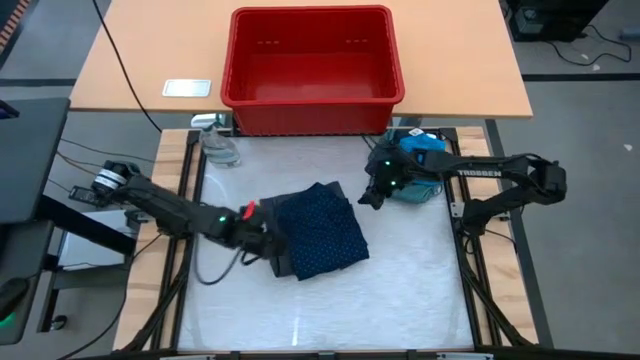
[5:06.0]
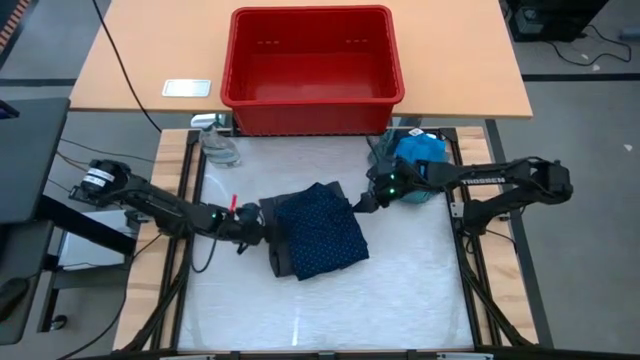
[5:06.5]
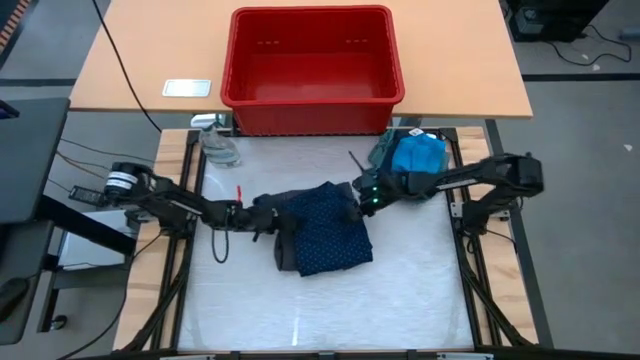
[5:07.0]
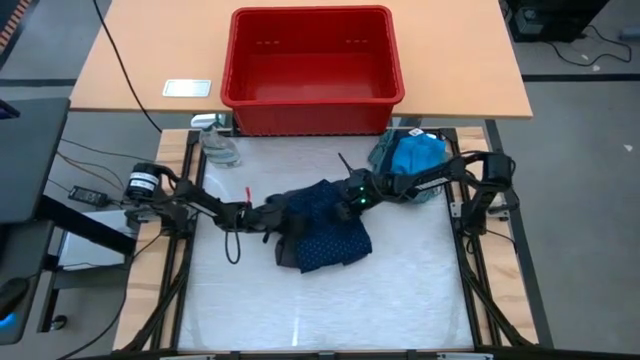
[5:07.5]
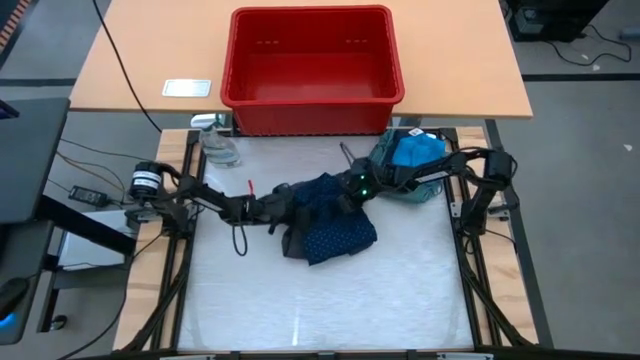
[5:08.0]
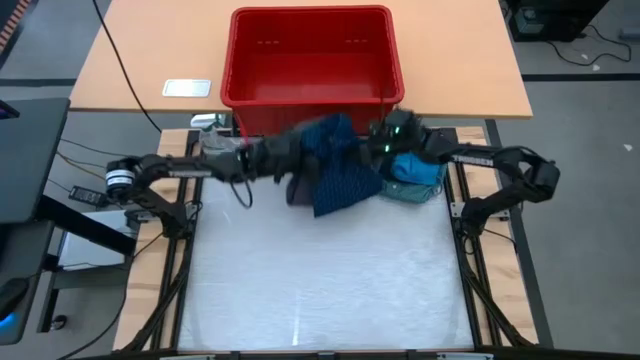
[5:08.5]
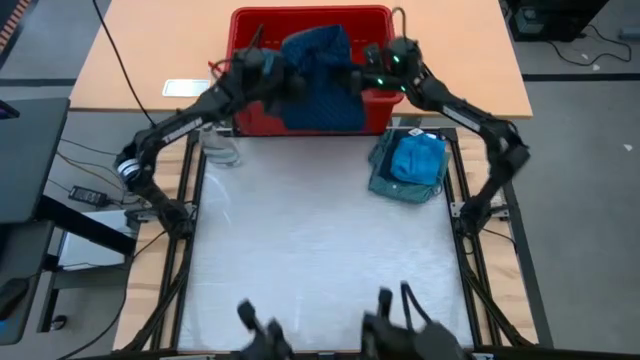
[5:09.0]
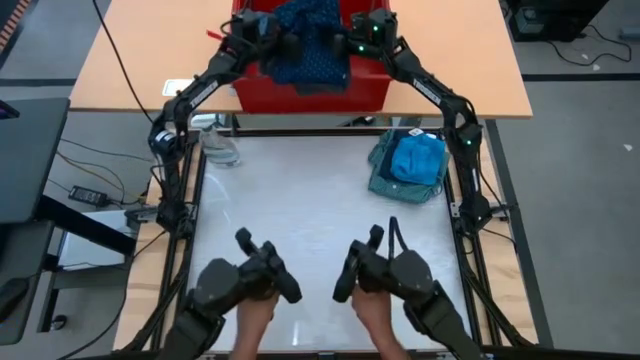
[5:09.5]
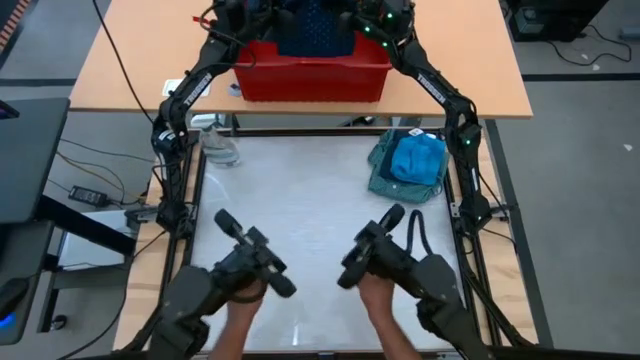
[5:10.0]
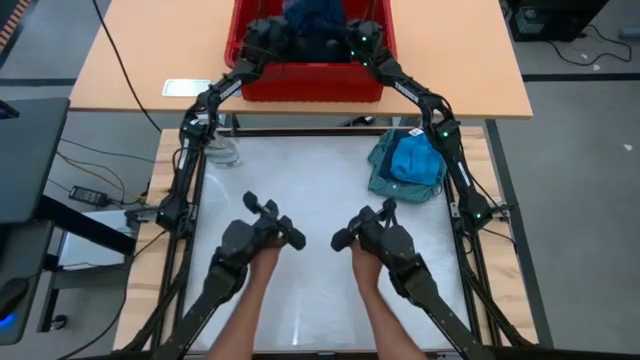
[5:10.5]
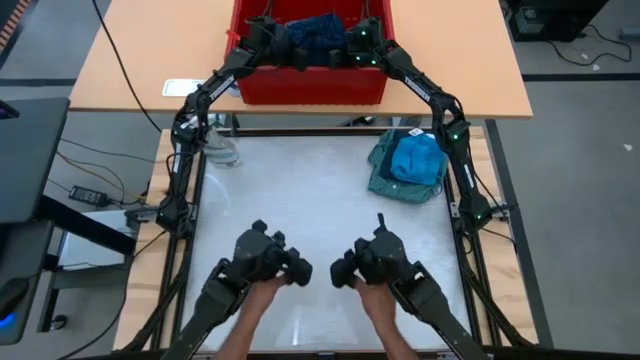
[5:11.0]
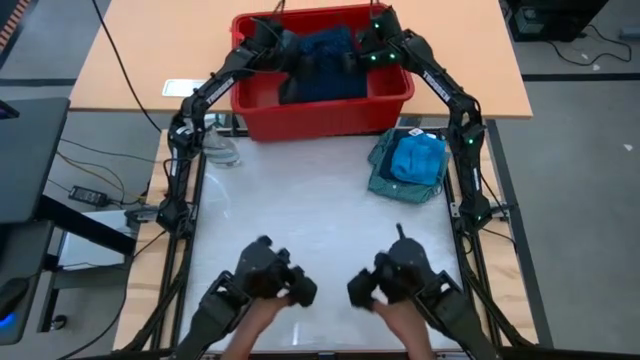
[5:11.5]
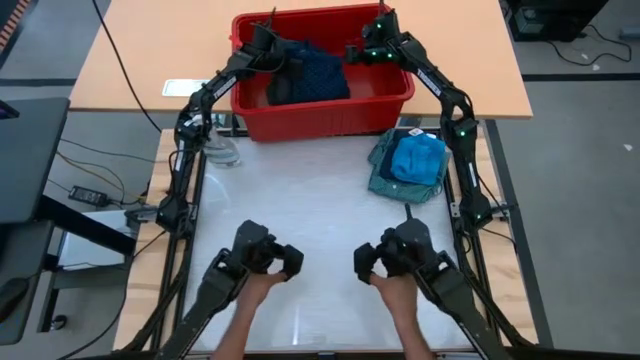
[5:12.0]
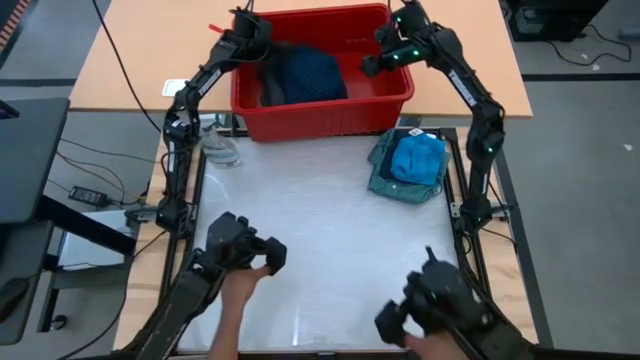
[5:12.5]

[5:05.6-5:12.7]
Task: Fold laundry
Put the dark blue polo shirt and the gray shorts into the red laundry bin

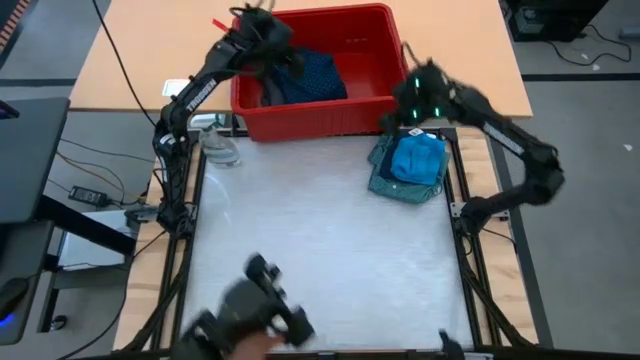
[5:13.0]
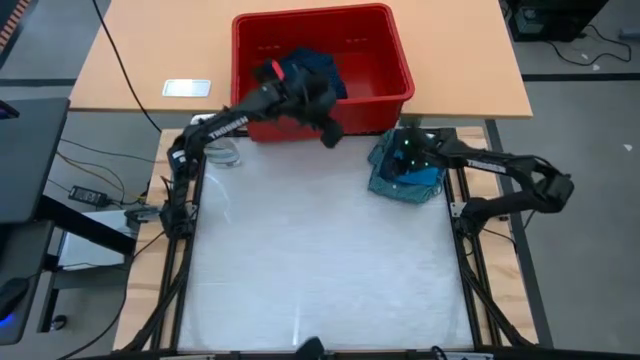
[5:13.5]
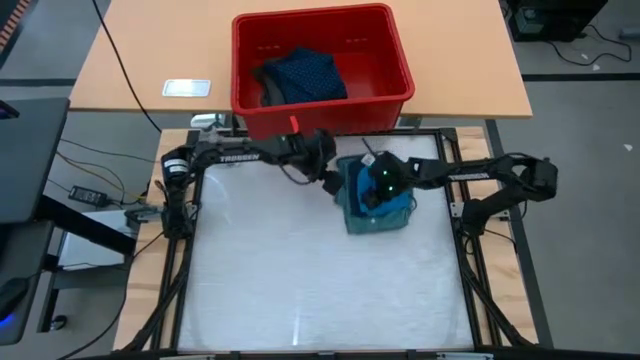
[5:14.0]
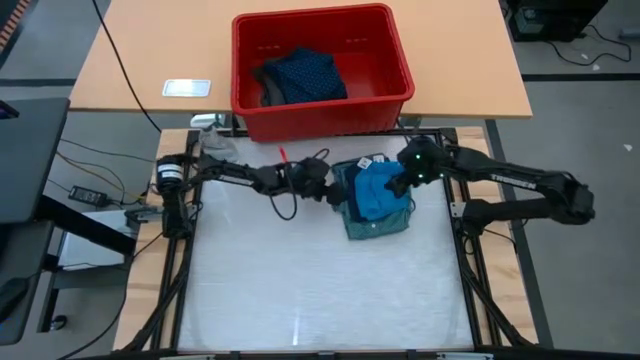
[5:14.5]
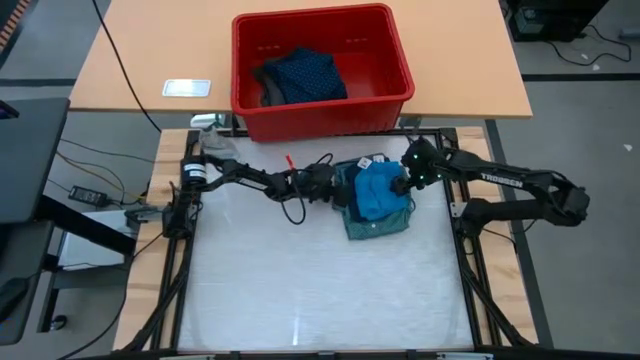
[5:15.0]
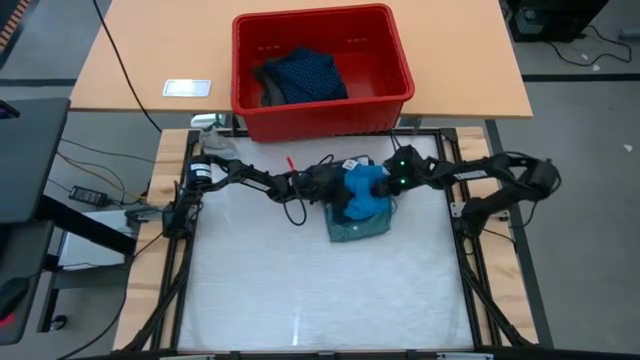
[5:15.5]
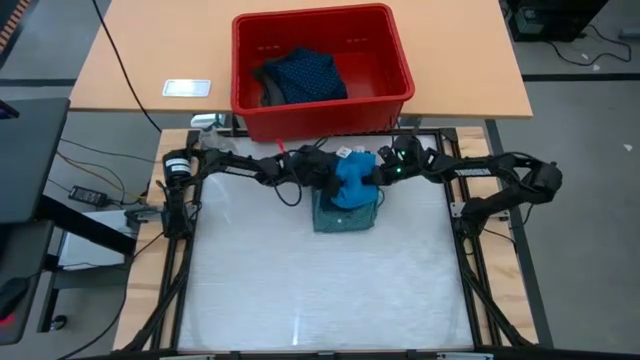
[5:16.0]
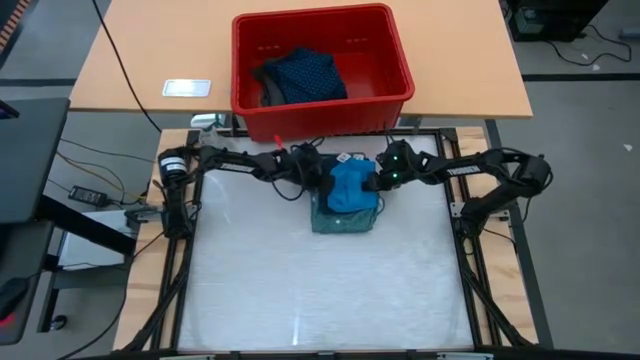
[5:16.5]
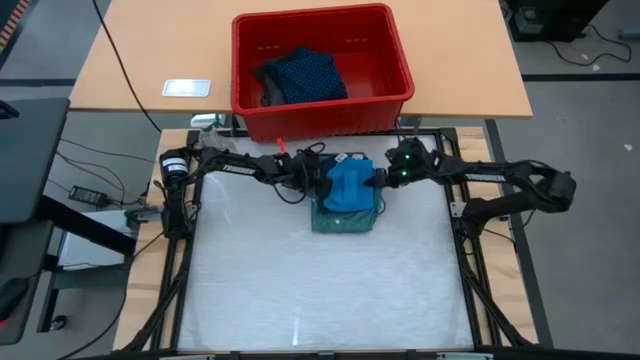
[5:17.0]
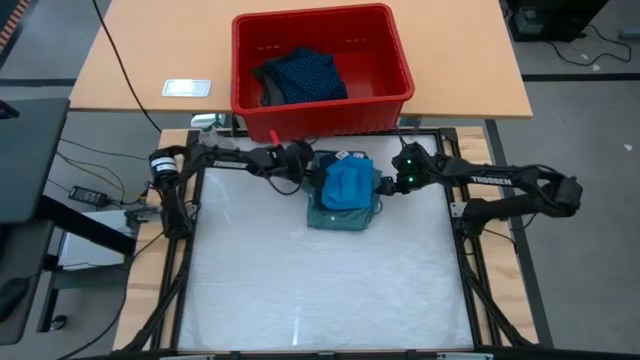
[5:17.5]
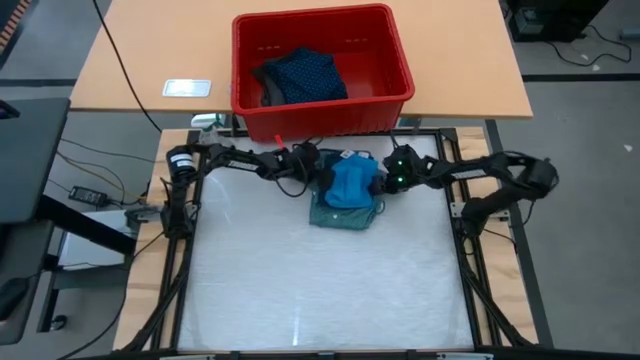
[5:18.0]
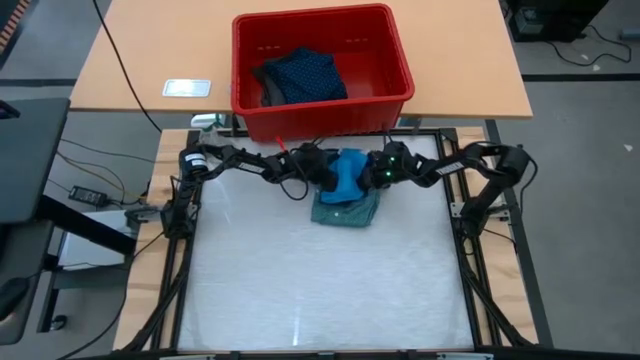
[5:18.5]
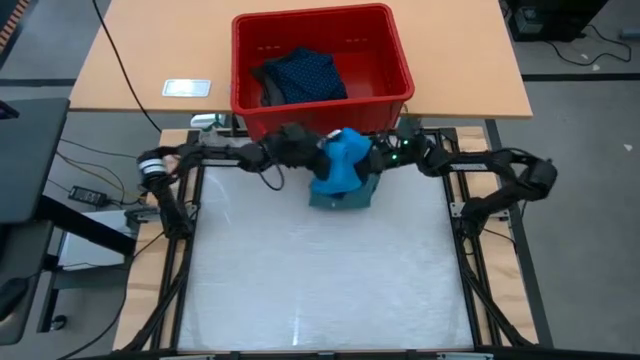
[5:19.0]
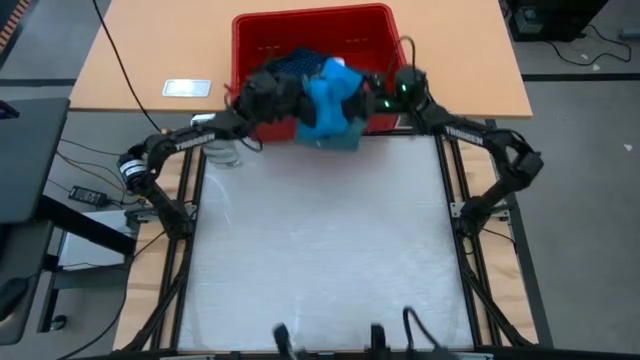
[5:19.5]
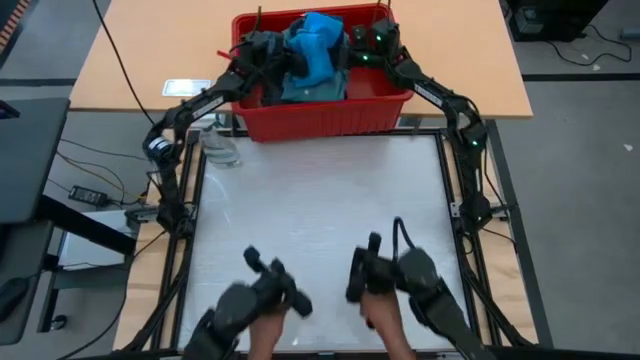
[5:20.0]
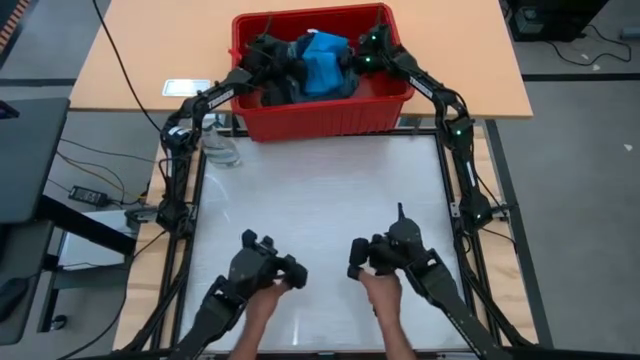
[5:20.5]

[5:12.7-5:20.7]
Put the green polo shirt, dark blue shorts, and light blue shorts into the red laundry bin

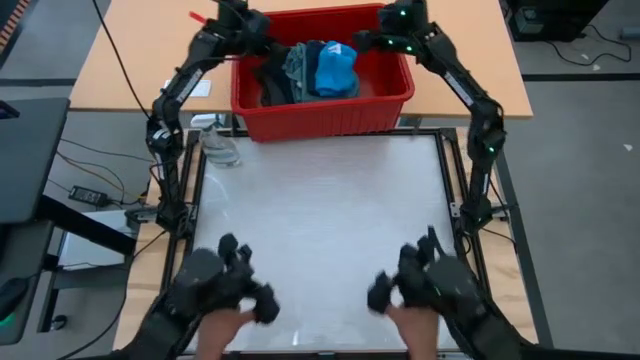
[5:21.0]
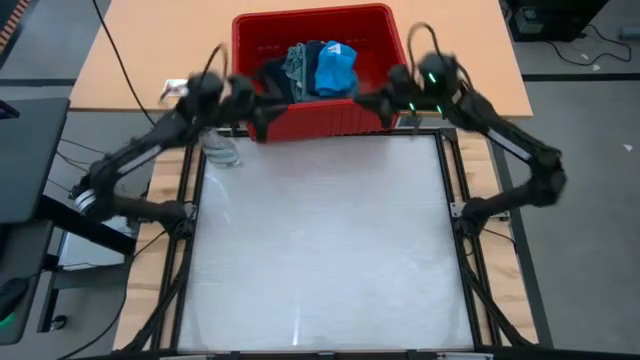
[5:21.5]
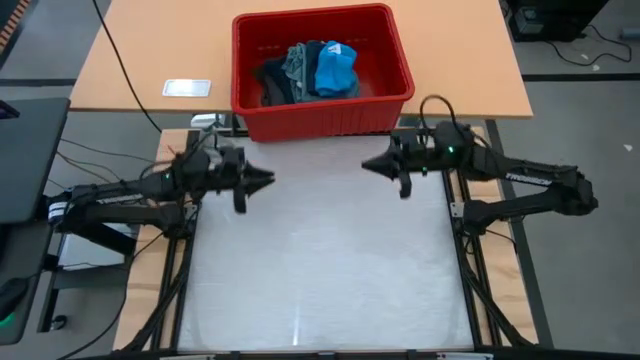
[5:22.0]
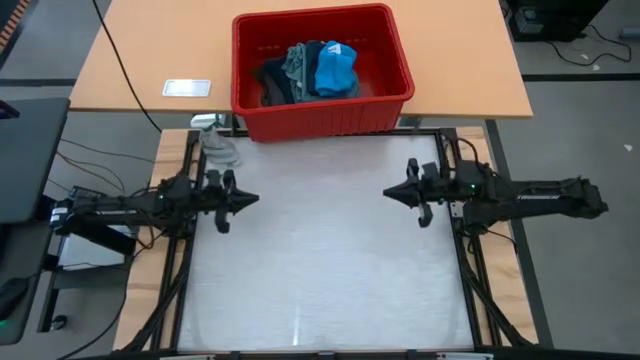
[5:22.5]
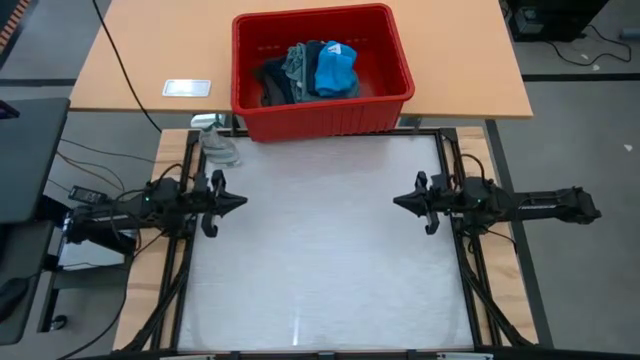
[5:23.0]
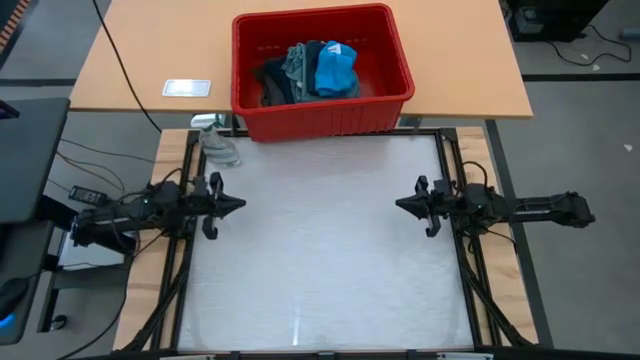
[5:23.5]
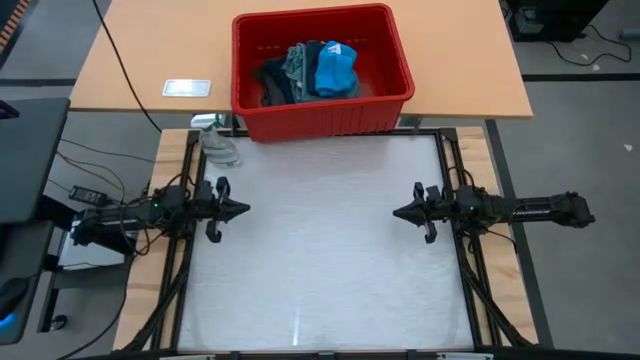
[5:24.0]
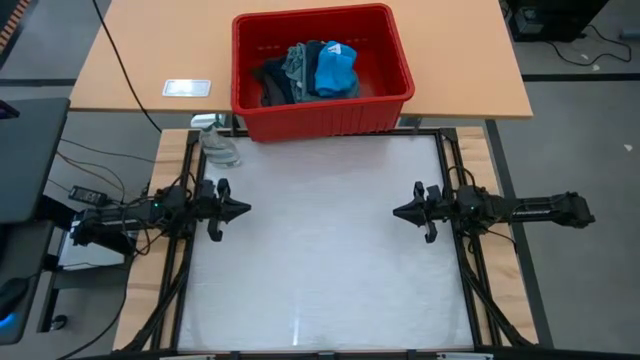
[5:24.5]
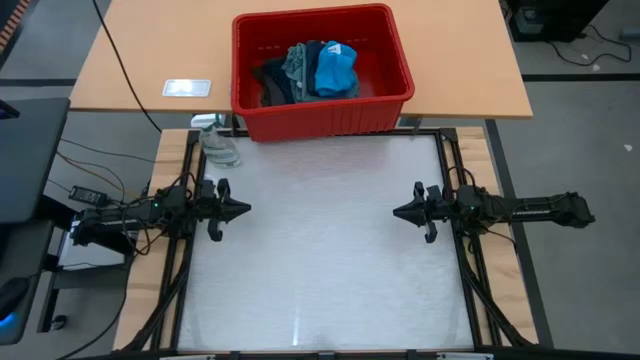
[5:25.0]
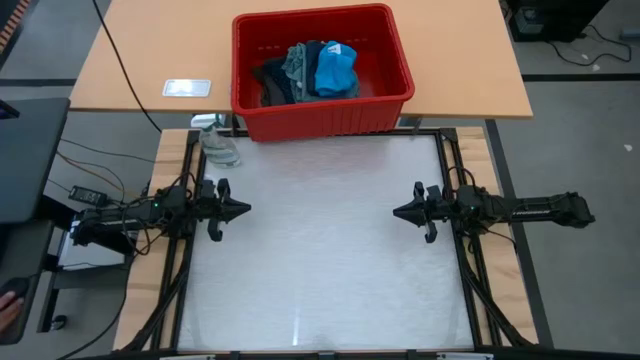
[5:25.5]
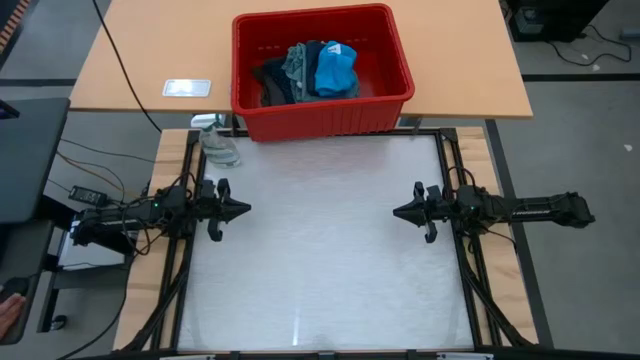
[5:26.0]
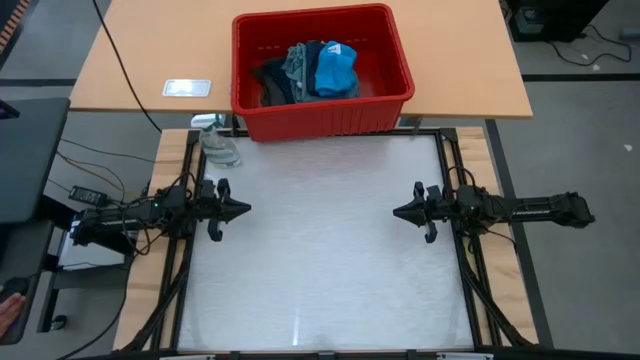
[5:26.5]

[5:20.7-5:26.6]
Return to Home Position

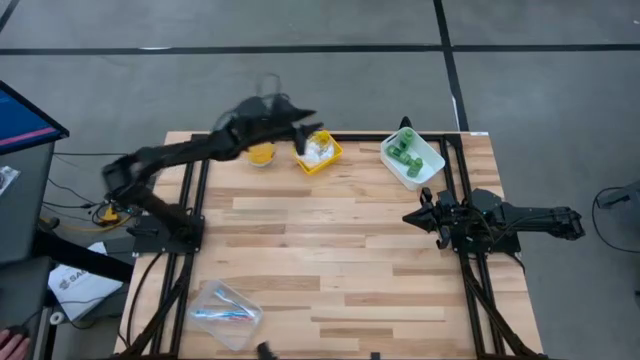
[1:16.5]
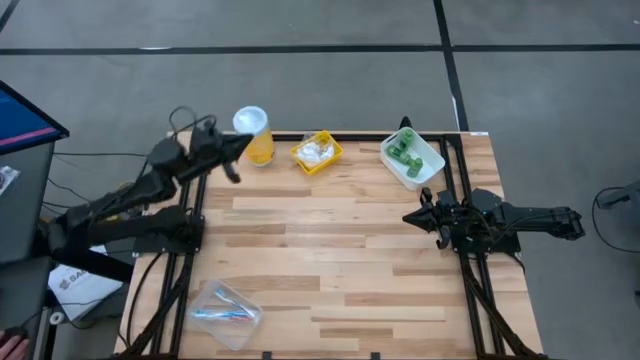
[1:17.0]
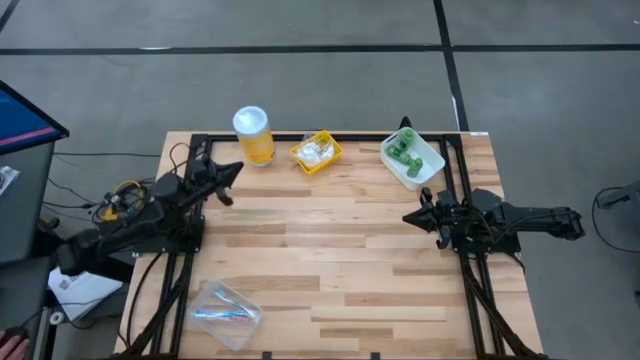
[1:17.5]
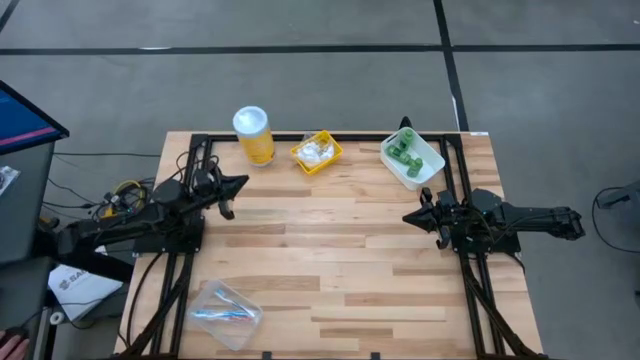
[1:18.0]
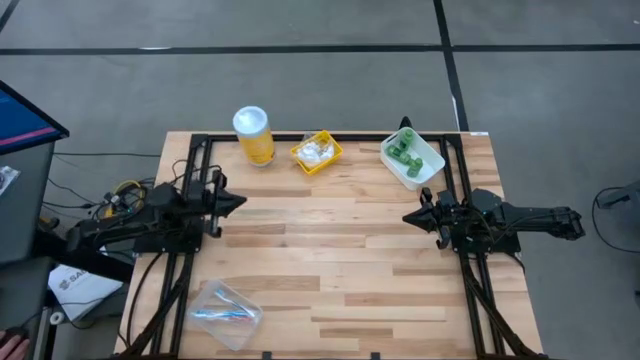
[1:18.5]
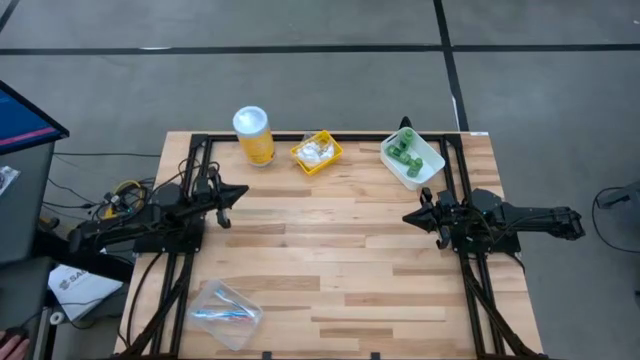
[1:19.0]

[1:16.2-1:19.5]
Task: Pick & Place Travel size toiletries
Return to Home Position
